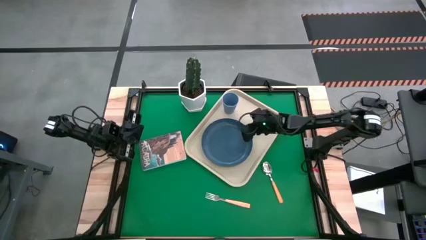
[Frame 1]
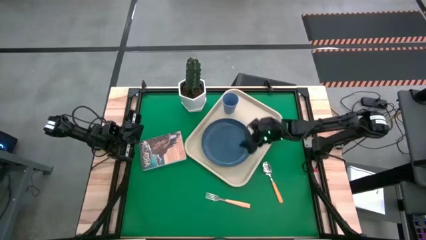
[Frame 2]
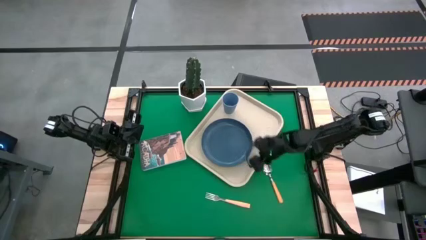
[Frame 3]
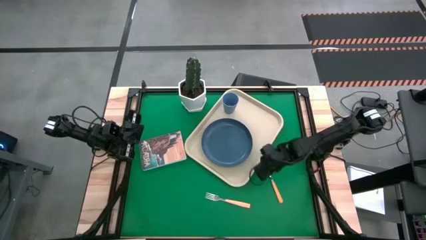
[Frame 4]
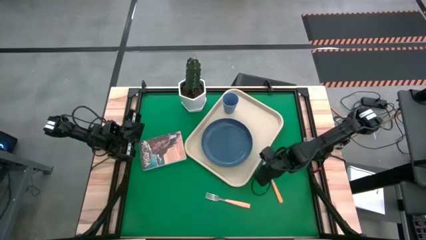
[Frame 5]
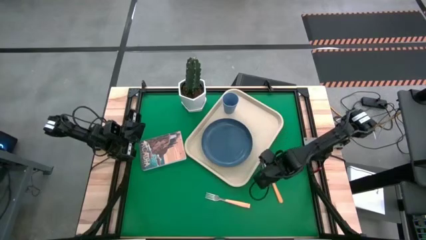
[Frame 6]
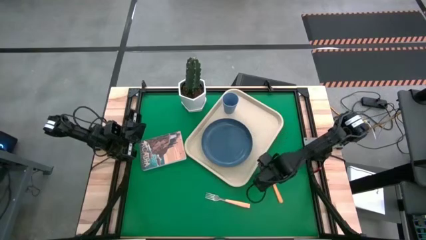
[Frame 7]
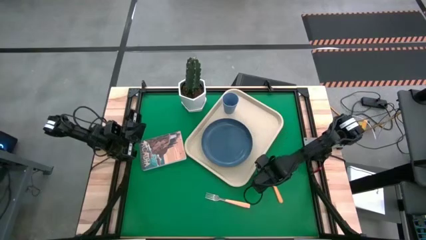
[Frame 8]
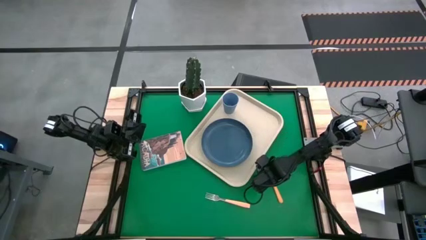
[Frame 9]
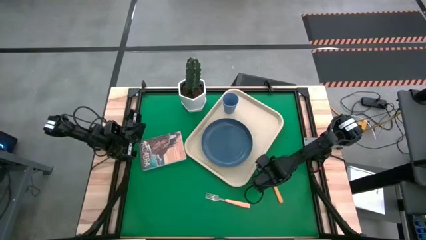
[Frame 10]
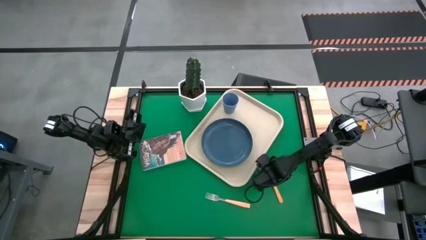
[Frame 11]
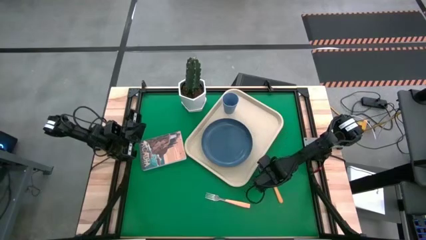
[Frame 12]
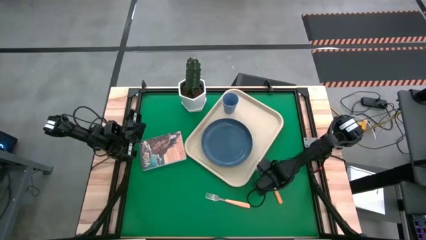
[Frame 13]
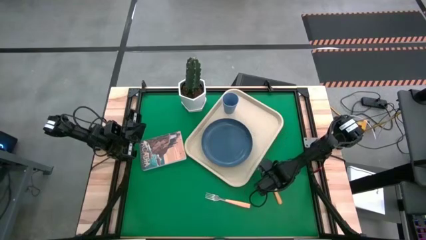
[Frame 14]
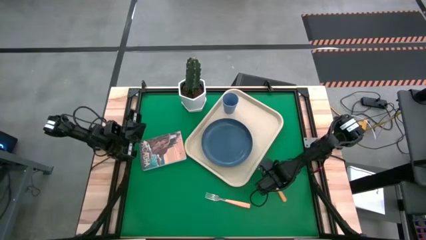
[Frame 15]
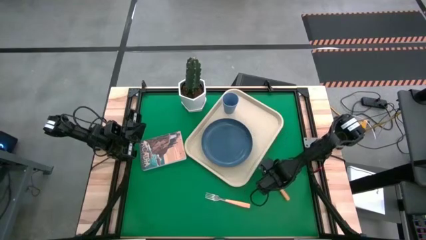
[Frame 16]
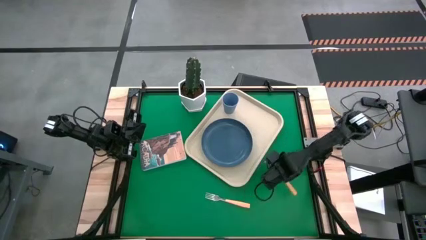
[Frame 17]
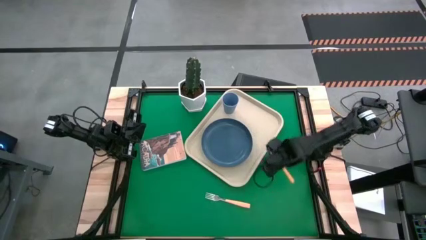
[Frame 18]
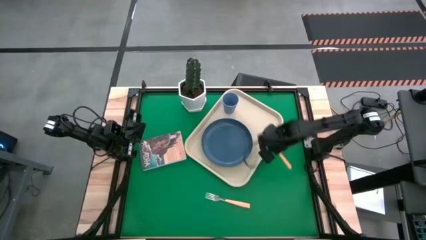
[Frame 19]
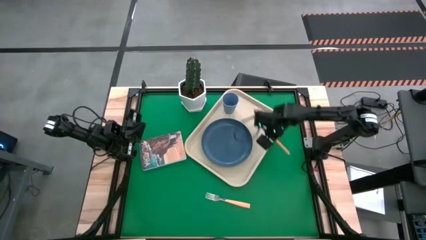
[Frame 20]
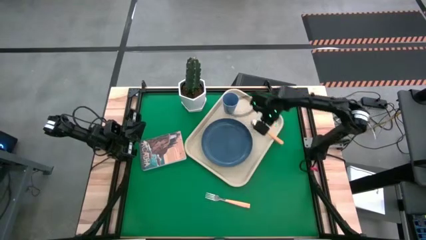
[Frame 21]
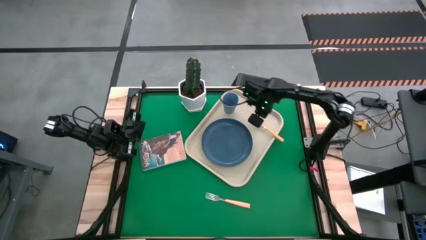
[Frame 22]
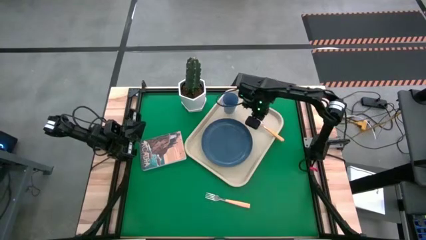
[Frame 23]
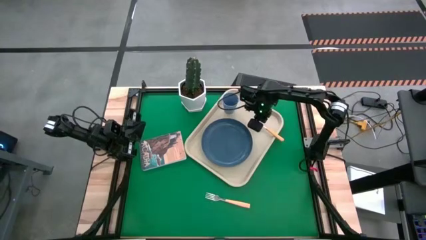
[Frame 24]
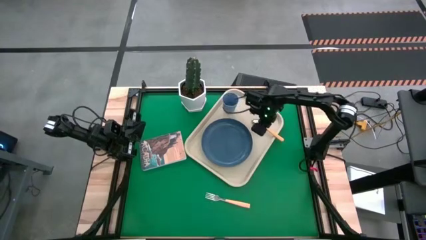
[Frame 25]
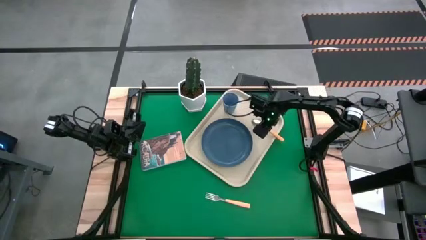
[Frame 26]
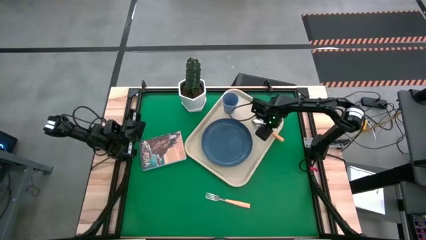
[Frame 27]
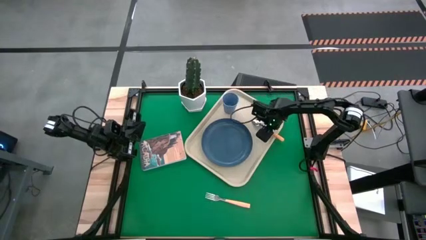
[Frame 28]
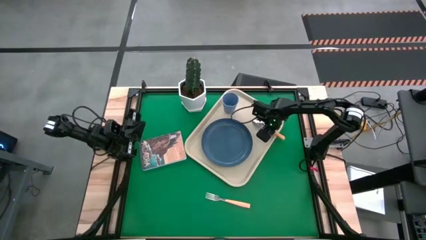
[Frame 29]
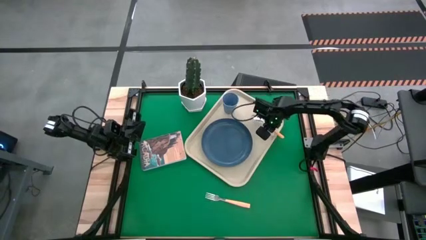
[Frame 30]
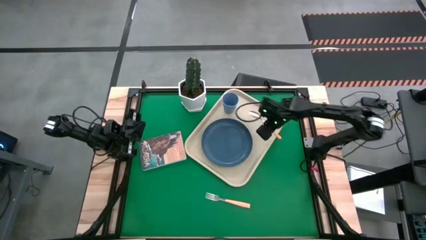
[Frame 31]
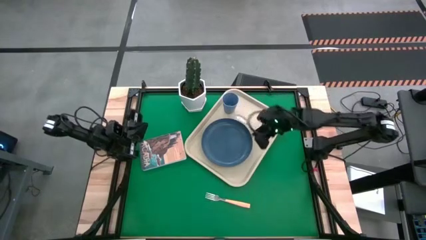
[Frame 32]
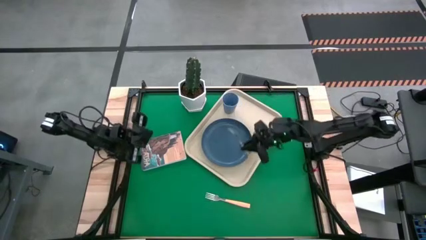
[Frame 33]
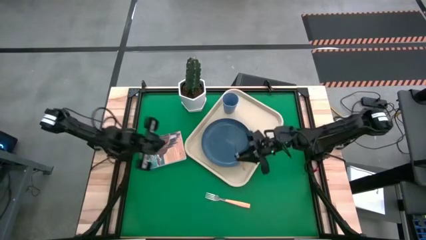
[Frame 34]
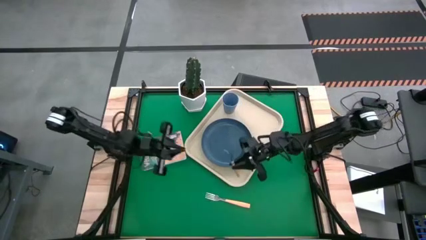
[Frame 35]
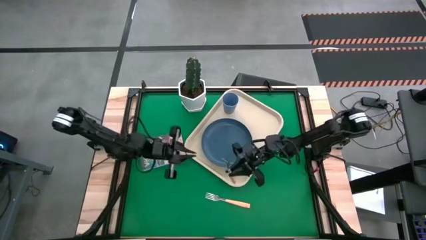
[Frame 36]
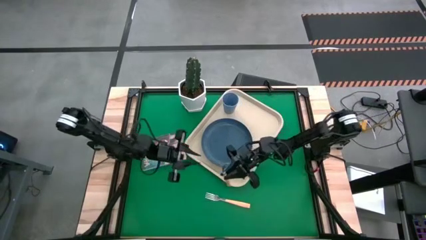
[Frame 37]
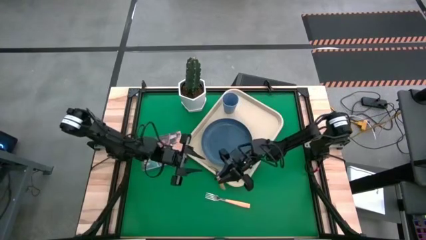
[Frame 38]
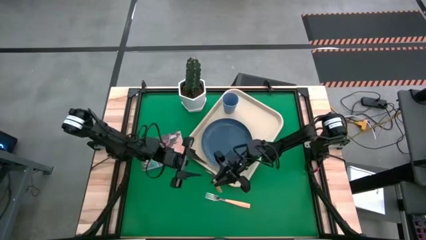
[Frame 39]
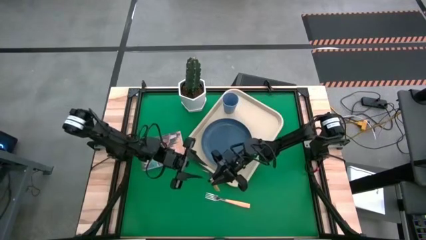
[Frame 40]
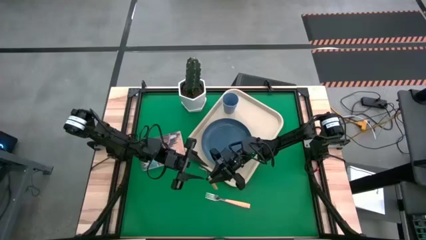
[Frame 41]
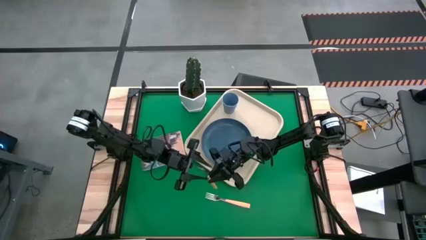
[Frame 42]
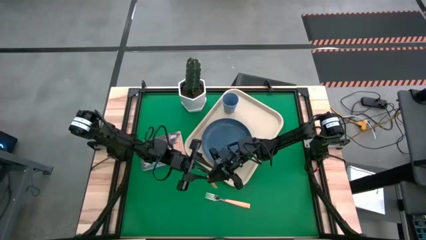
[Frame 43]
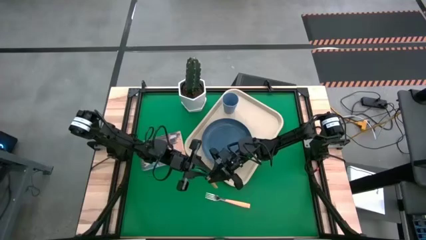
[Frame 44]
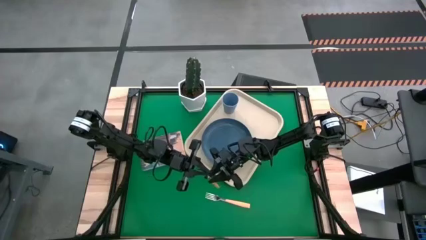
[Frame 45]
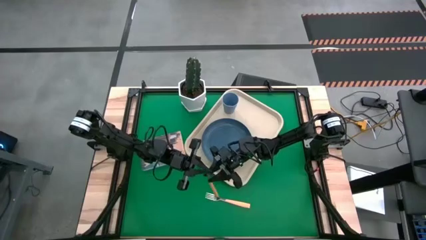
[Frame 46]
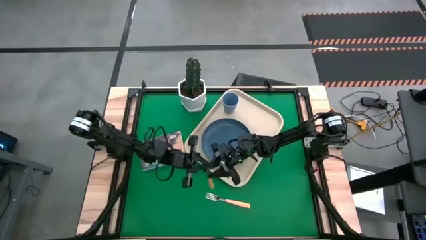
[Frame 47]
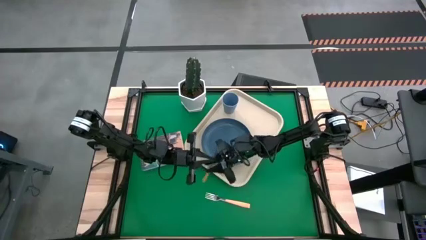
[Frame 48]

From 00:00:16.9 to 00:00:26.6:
Task: Pick and place plate/cup/fork/spoon on tray
Put the orange spoon on the right of the white tray

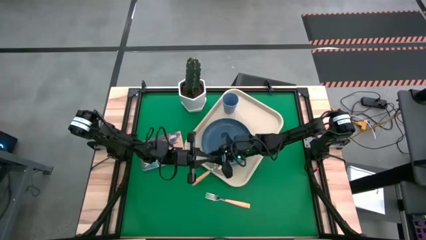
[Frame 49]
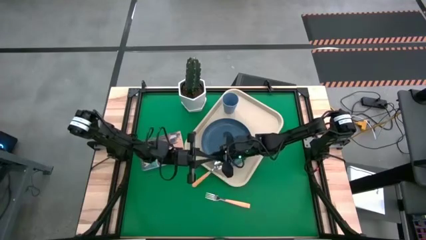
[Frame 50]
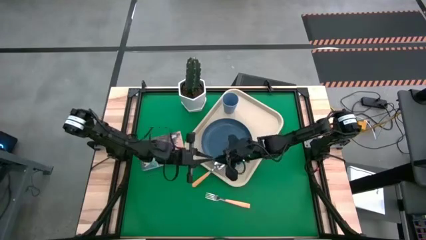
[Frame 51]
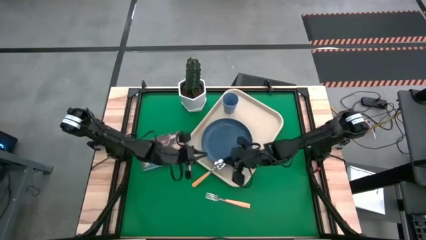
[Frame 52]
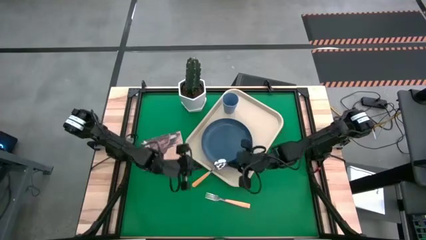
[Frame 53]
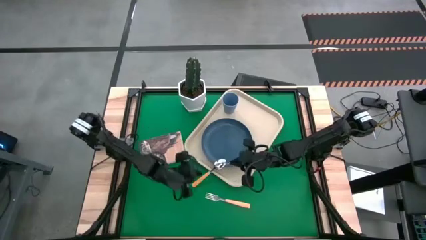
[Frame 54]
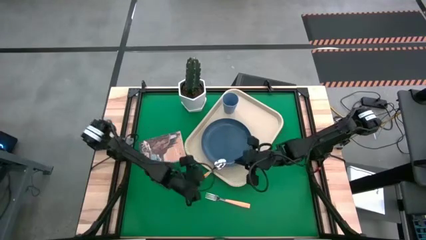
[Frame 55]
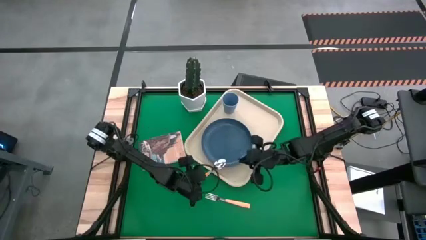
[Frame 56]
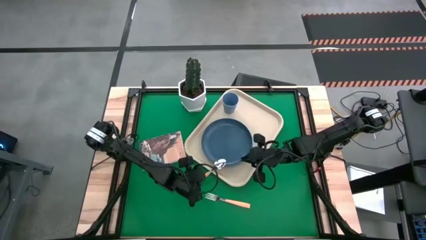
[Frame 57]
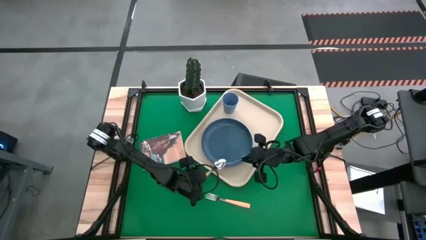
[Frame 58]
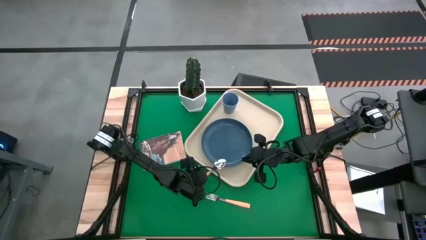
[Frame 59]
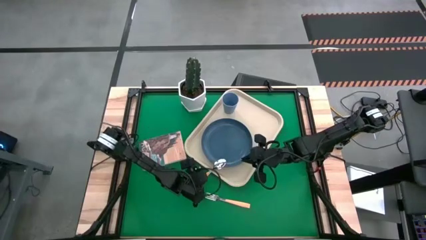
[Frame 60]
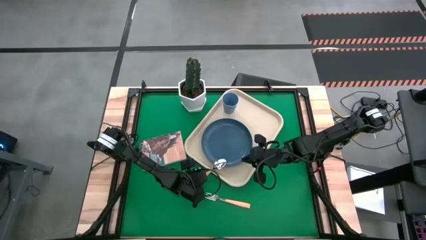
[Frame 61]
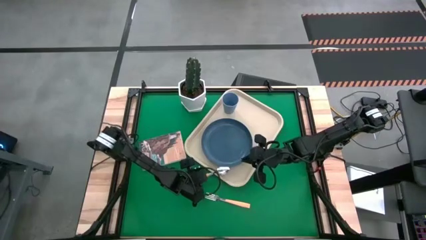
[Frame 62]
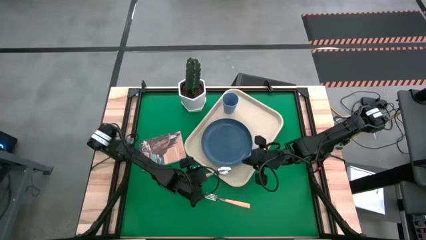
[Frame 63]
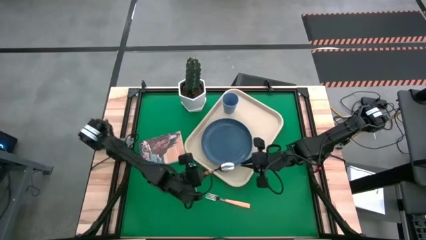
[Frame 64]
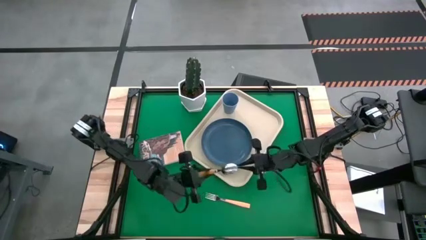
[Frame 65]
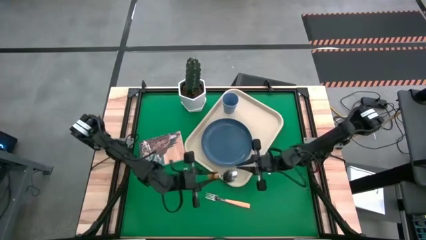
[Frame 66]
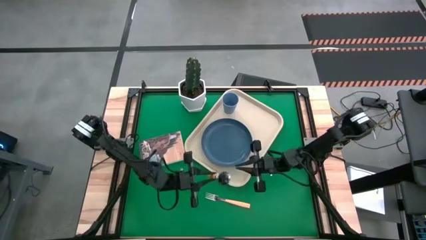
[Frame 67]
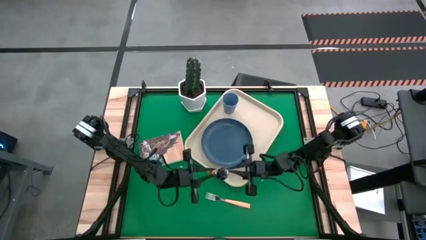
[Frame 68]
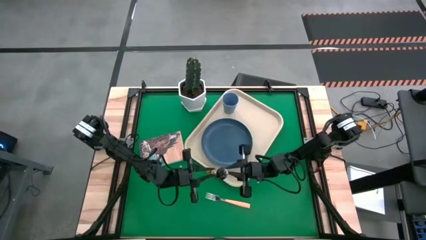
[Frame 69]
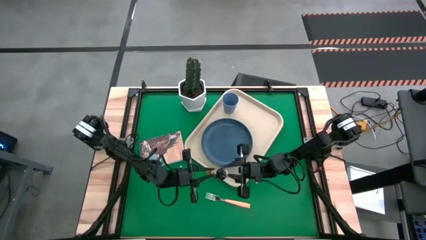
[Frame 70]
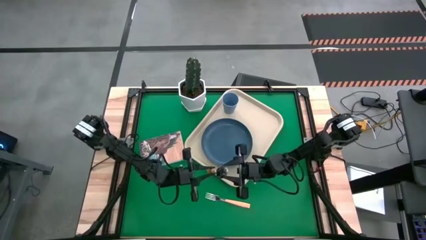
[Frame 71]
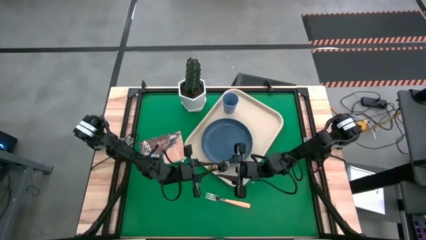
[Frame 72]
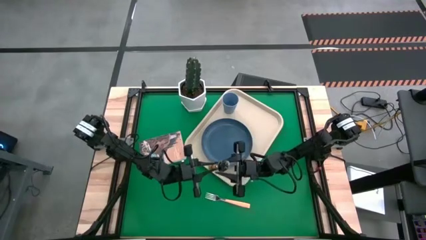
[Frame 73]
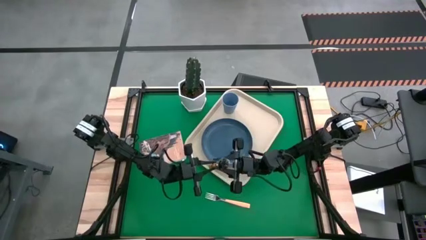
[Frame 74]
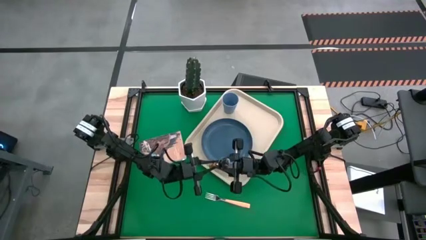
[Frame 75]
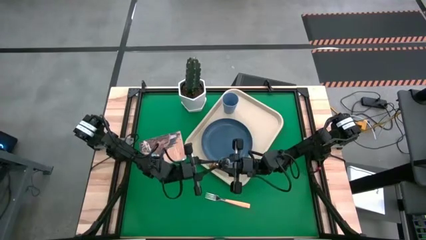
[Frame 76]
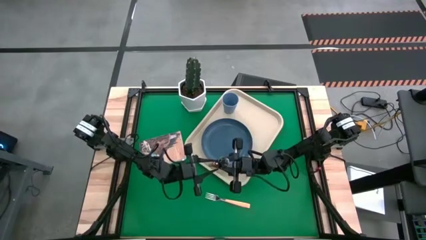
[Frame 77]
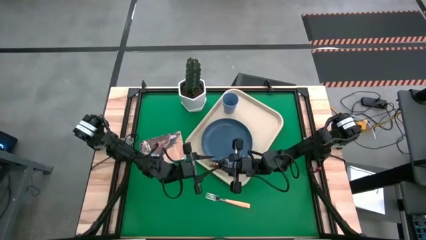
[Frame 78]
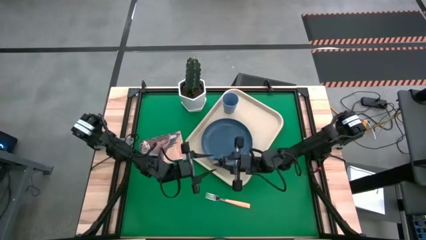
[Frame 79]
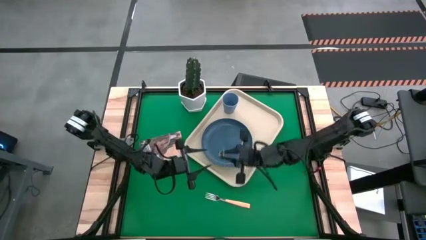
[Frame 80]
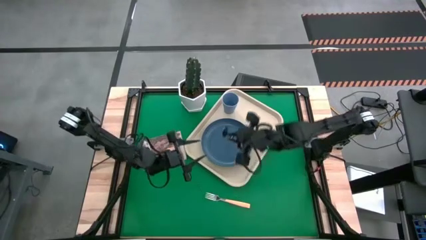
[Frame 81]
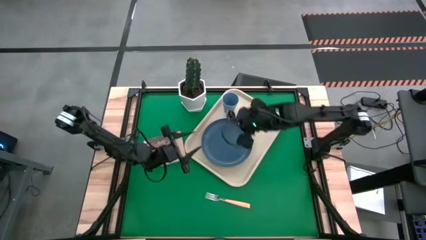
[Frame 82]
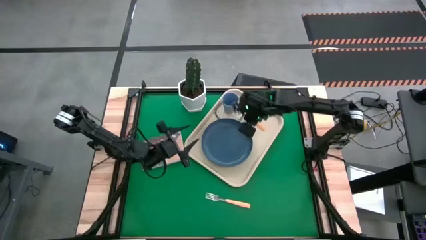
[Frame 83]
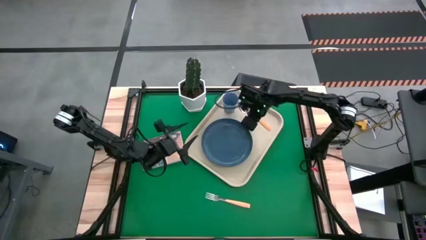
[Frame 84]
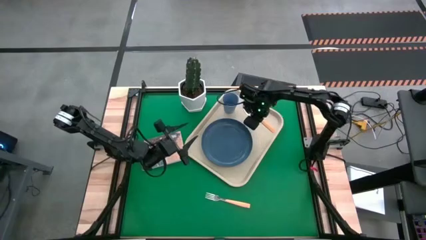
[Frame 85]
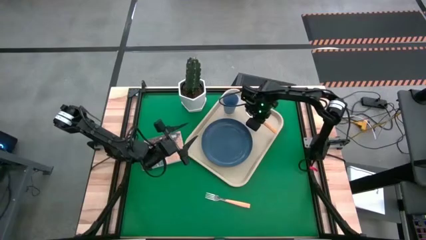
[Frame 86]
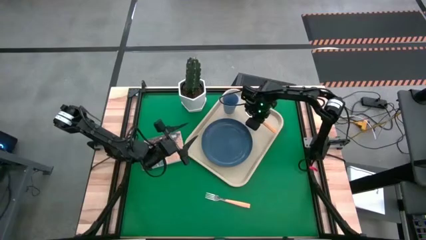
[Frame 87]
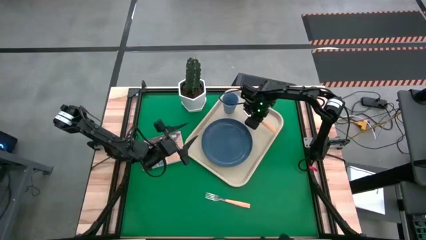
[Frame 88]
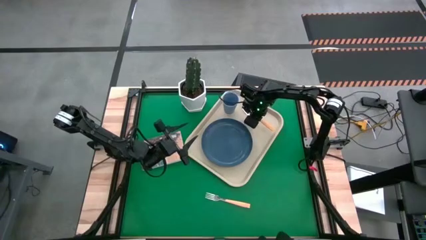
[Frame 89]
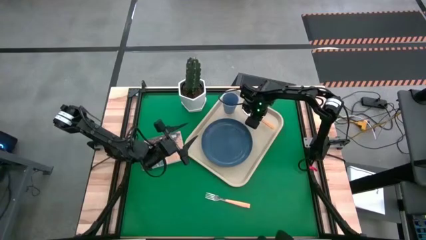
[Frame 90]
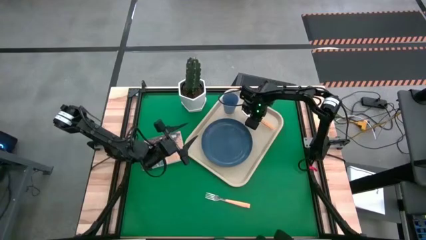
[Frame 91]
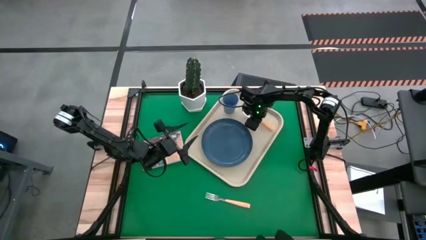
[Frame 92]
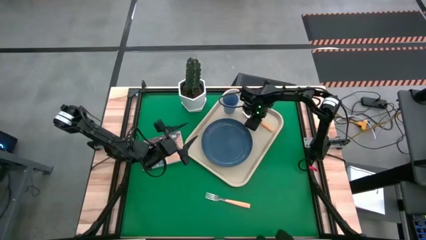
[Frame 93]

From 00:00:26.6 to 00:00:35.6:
Put the orange spoon on the right of the white tray
